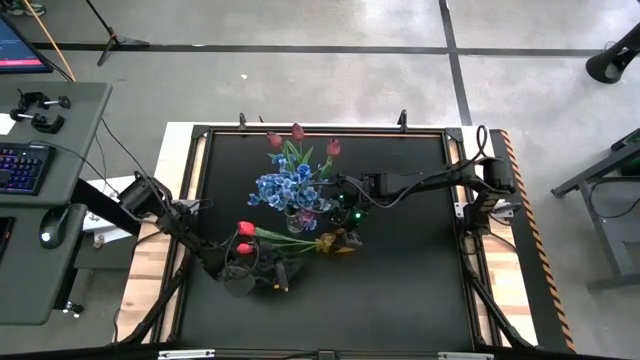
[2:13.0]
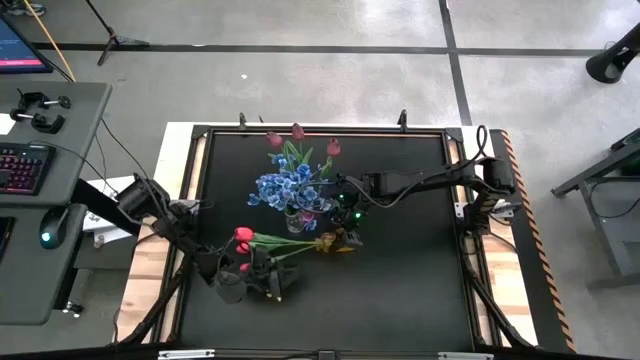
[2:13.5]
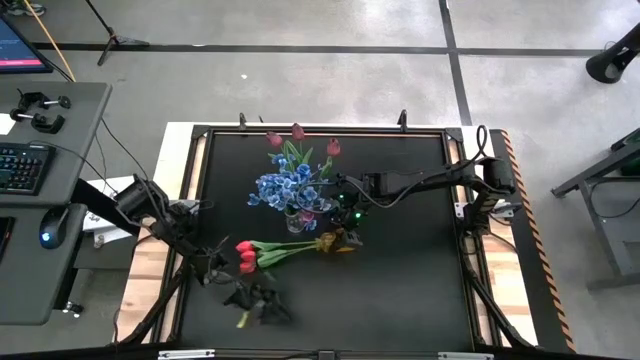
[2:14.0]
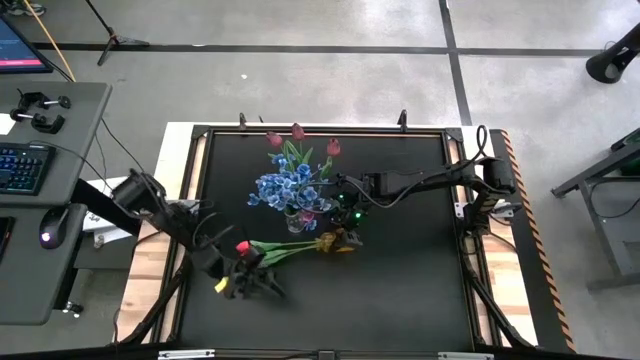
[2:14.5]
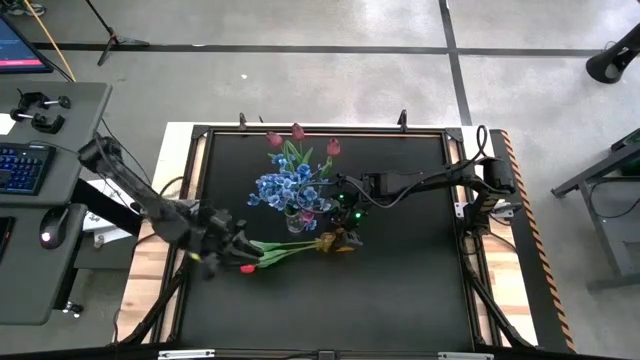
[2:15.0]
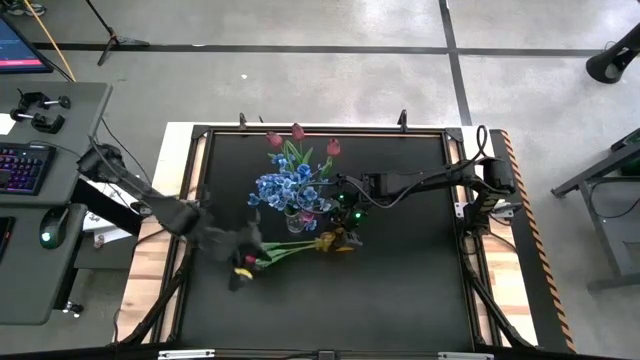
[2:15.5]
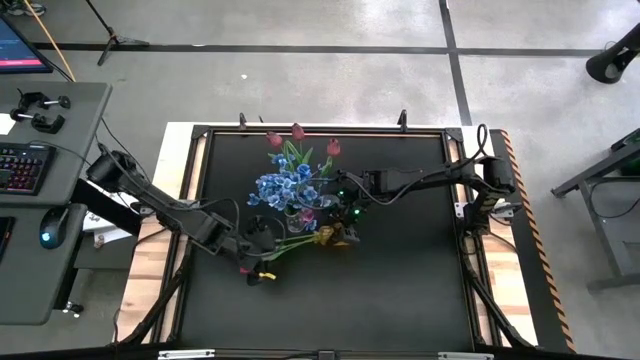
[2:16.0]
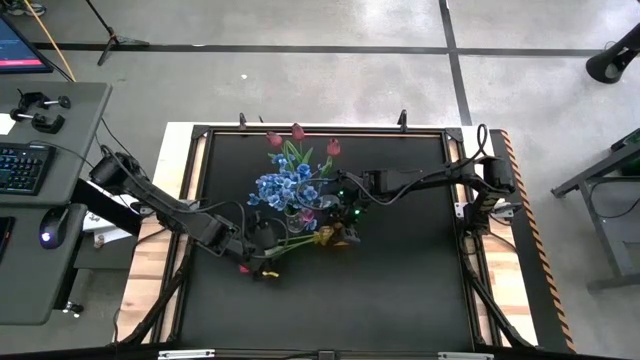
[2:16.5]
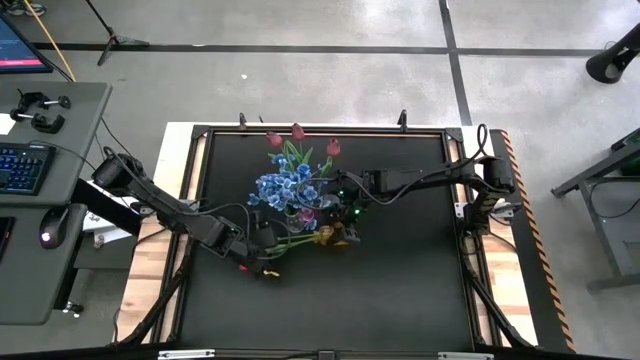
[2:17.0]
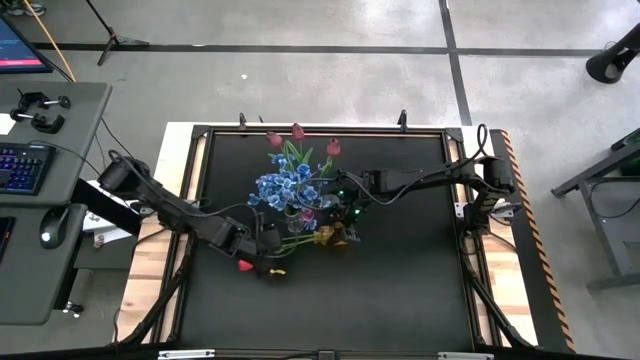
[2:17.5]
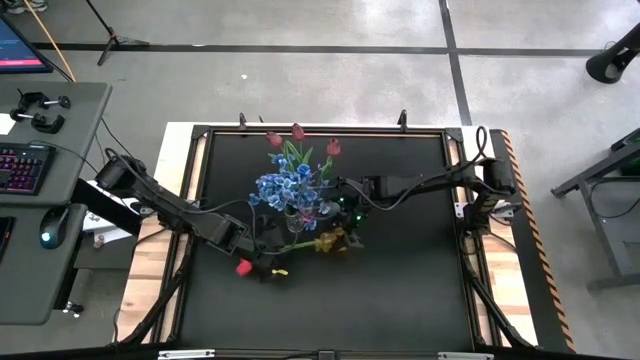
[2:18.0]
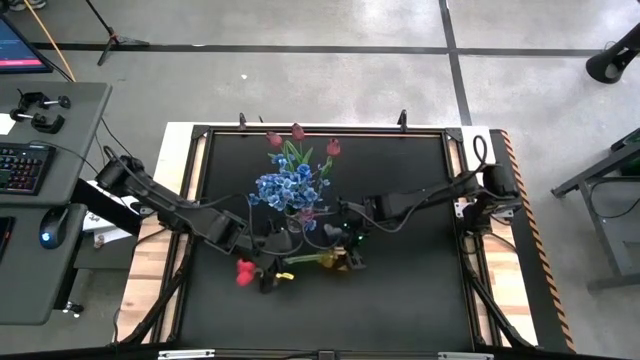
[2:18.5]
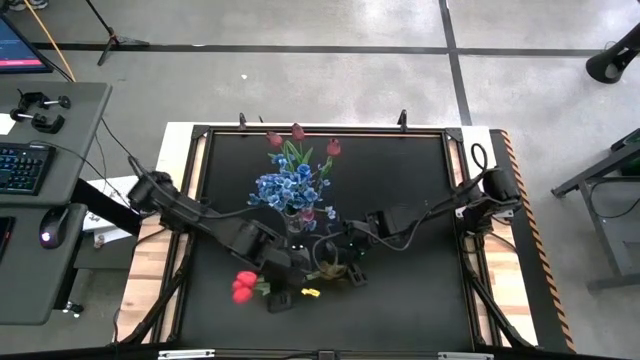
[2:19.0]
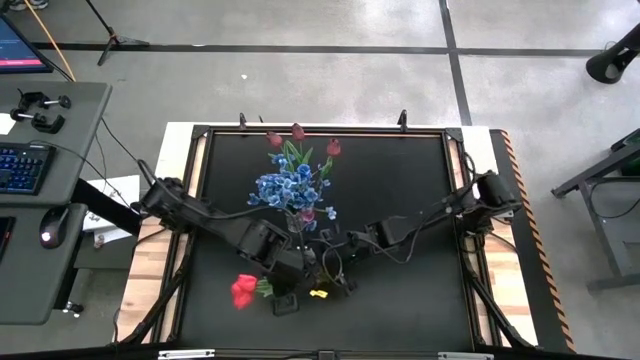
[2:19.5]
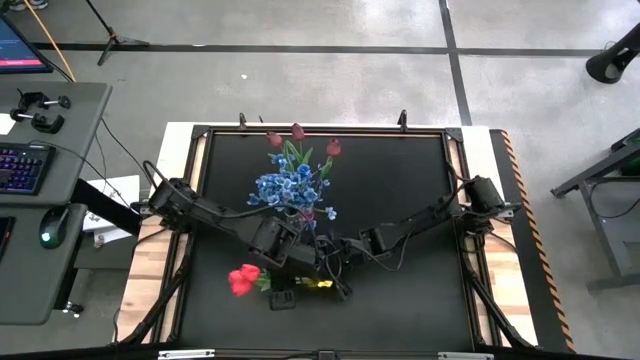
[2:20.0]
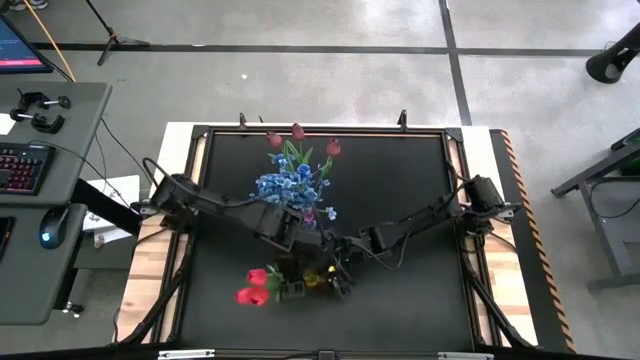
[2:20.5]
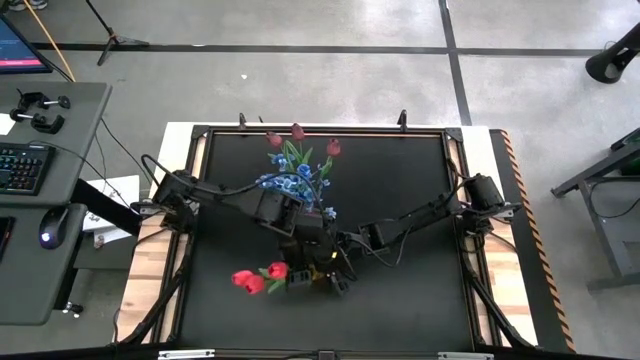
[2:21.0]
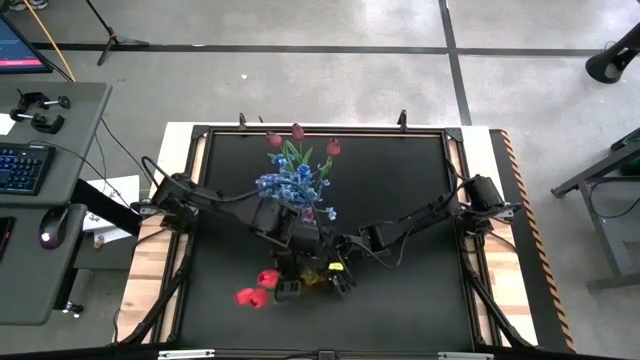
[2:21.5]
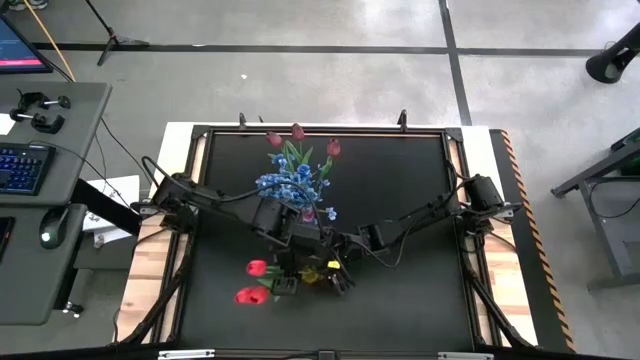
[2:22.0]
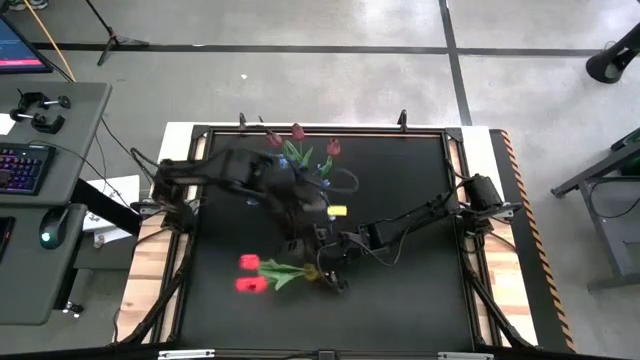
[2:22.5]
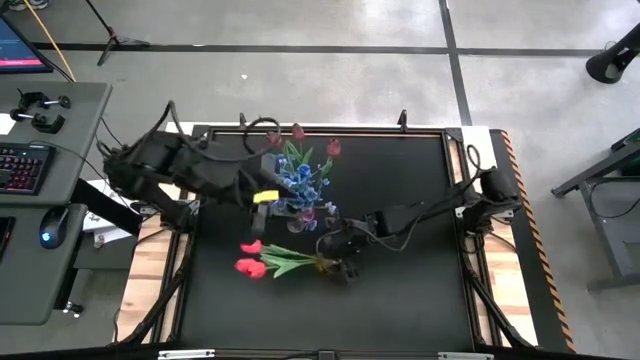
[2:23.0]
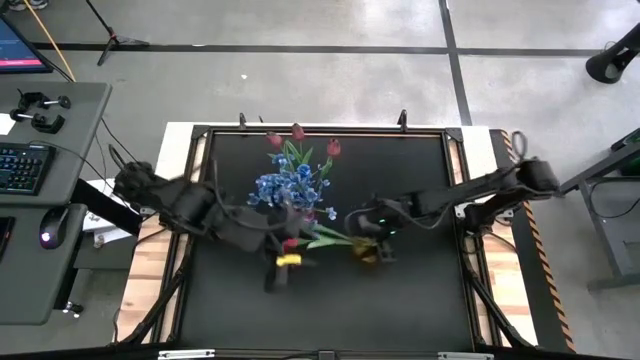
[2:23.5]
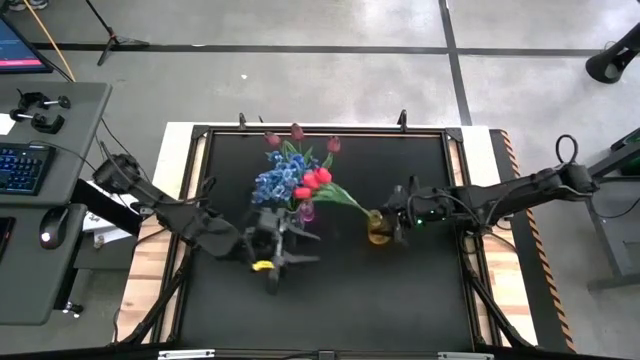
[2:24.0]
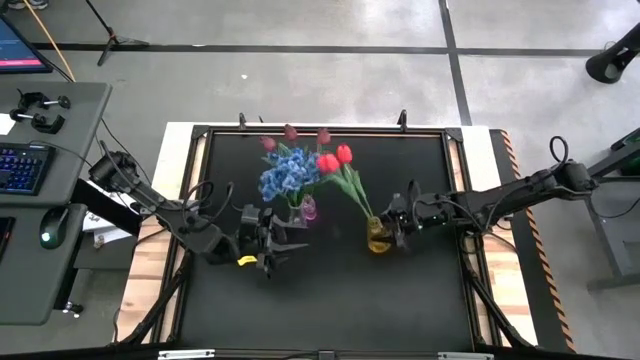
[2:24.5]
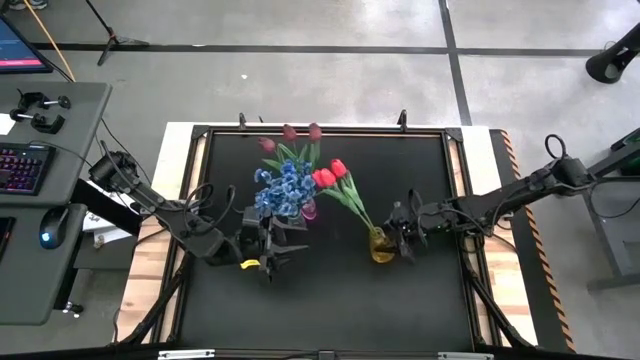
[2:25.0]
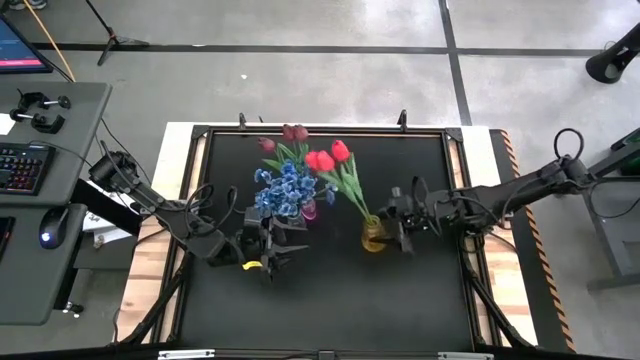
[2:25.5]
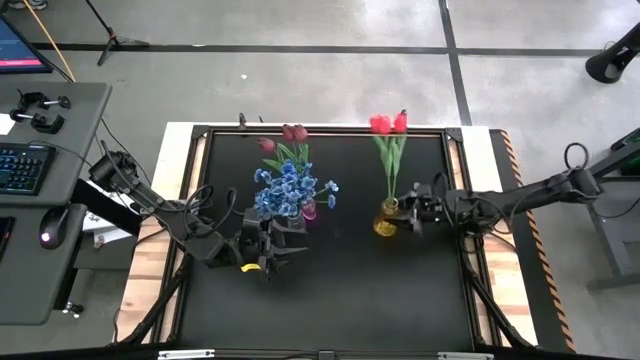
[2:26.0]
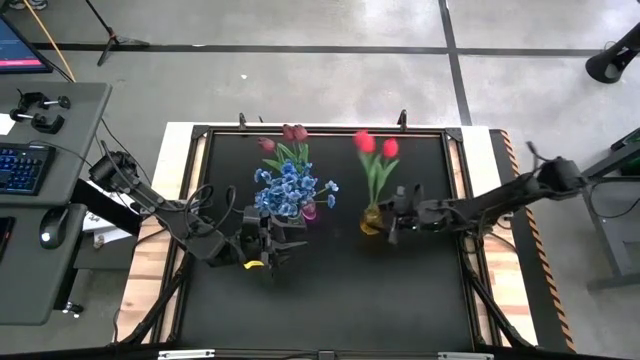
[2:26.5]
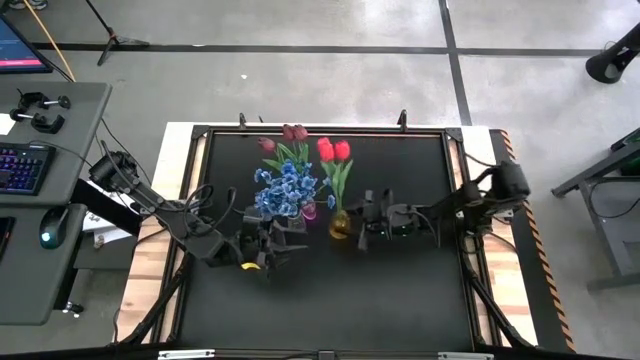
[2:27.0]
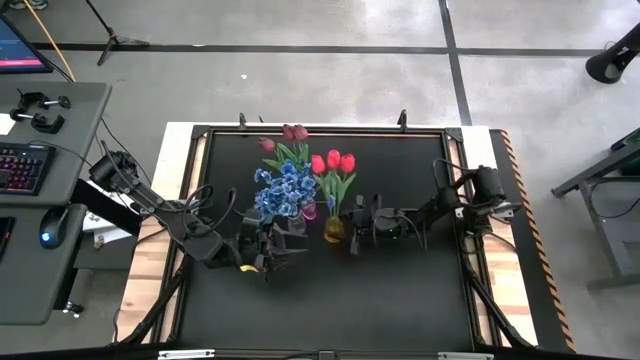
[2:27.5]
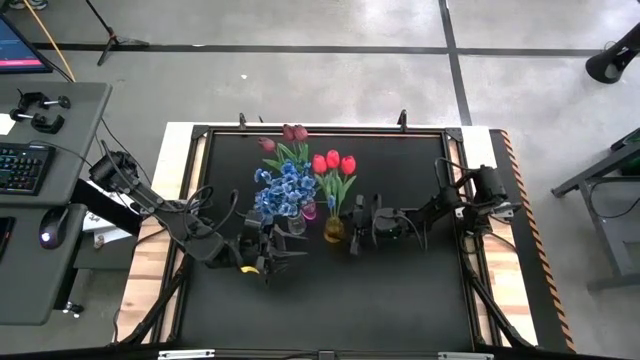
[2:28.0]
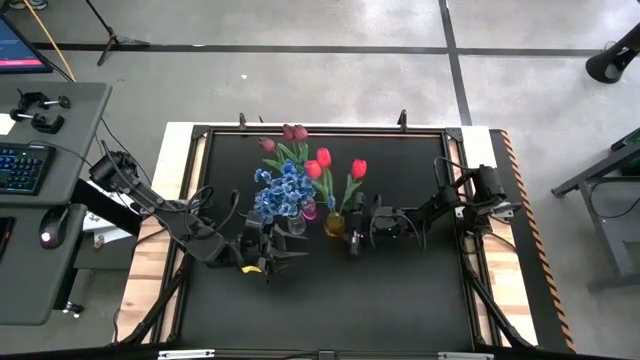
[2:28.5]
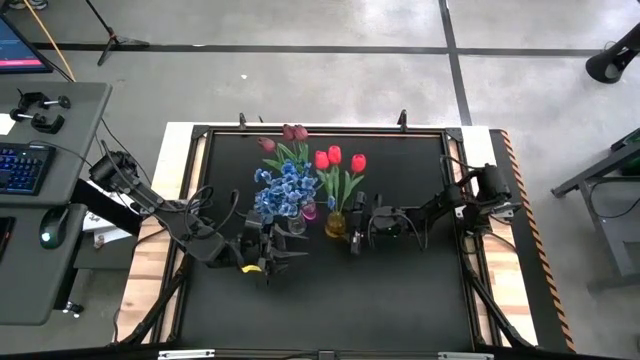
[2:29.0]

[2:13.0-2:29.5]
Task: Sort flowers into vase by color
Put the red flower into the yellow vase

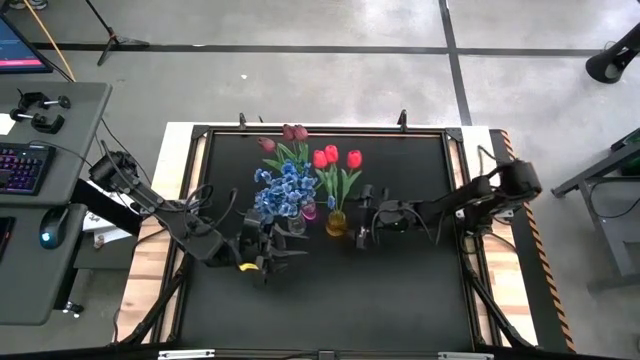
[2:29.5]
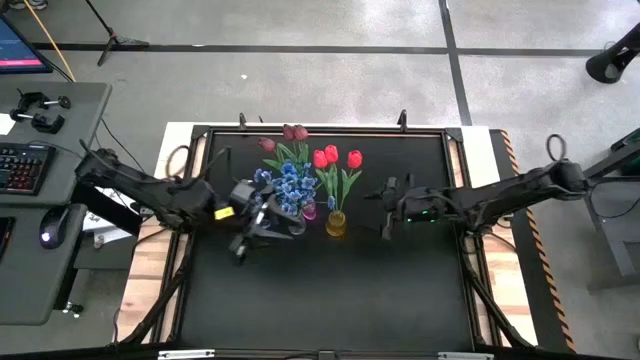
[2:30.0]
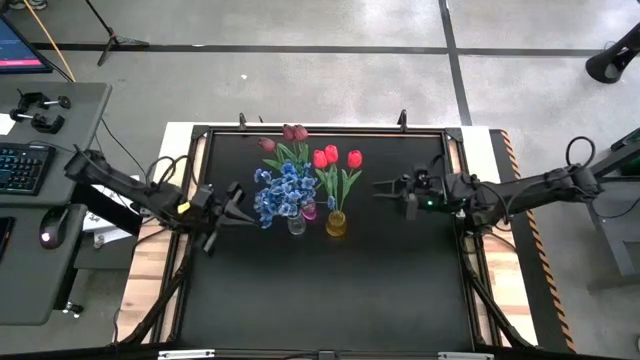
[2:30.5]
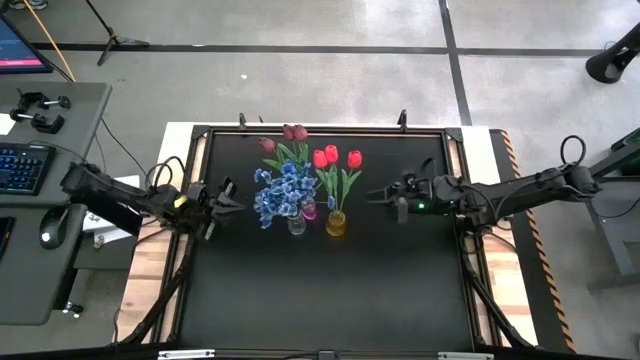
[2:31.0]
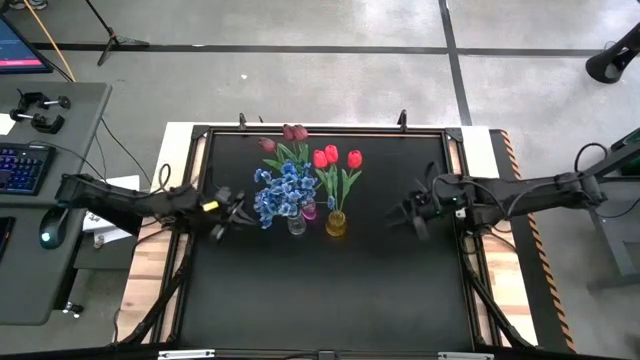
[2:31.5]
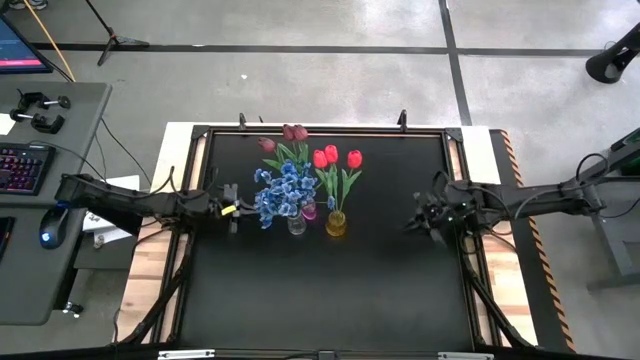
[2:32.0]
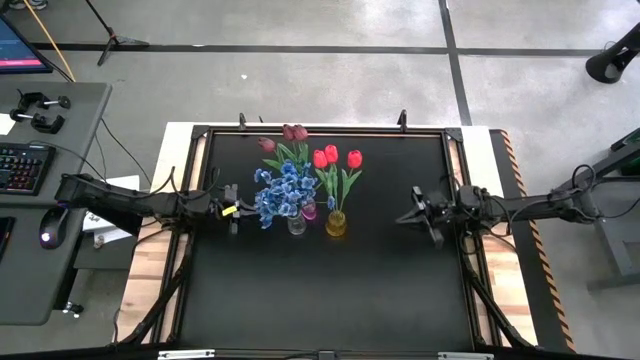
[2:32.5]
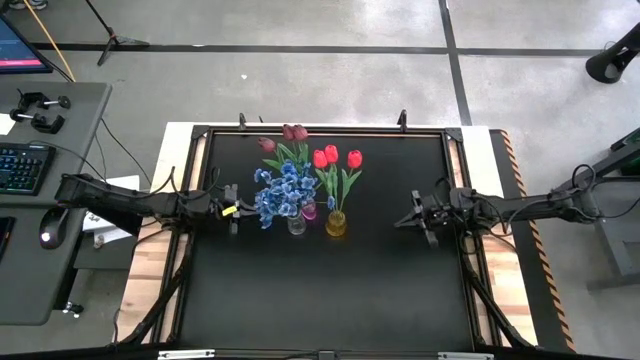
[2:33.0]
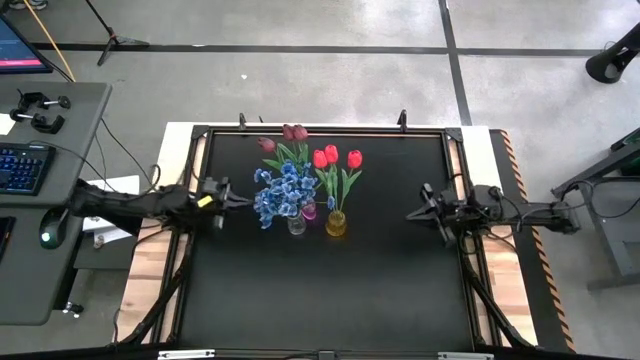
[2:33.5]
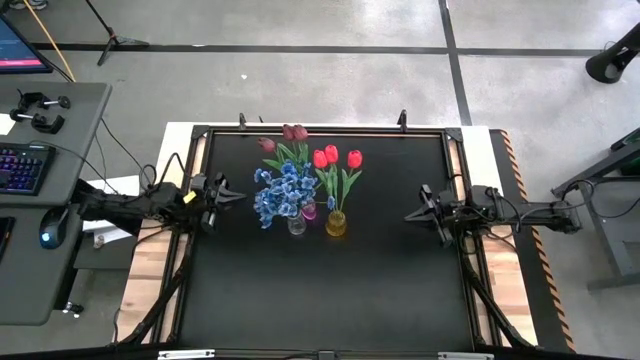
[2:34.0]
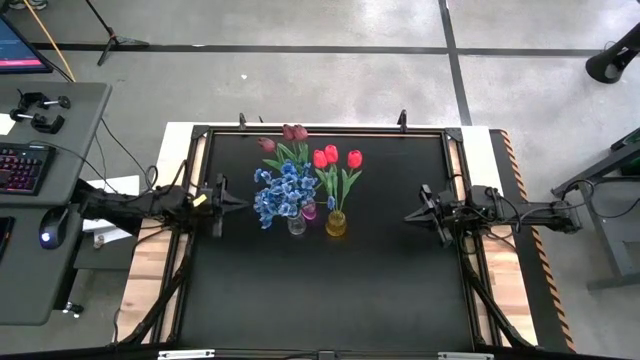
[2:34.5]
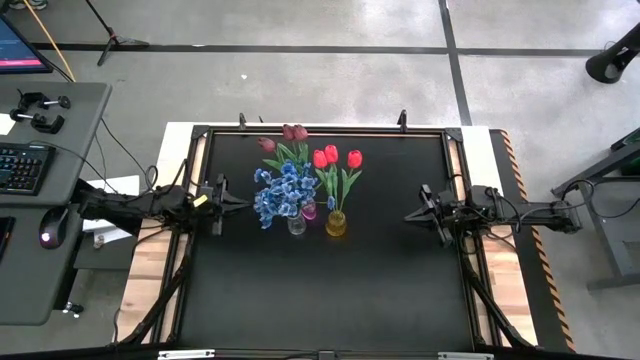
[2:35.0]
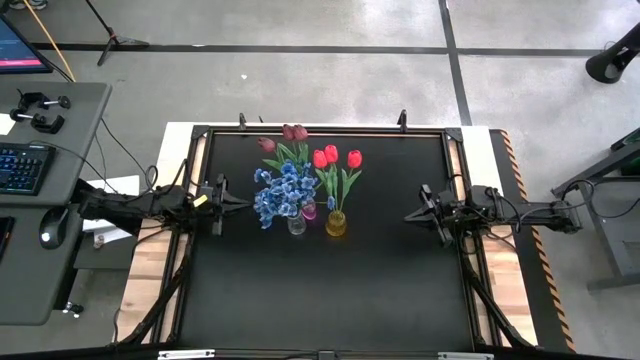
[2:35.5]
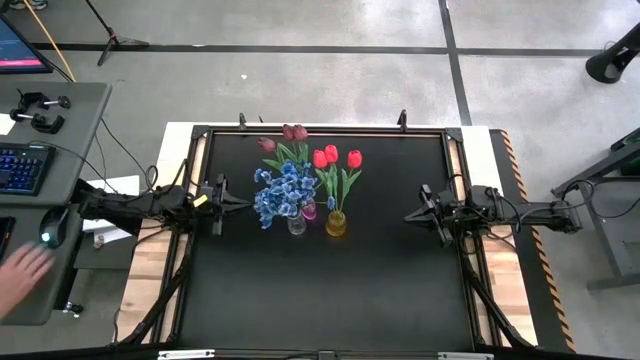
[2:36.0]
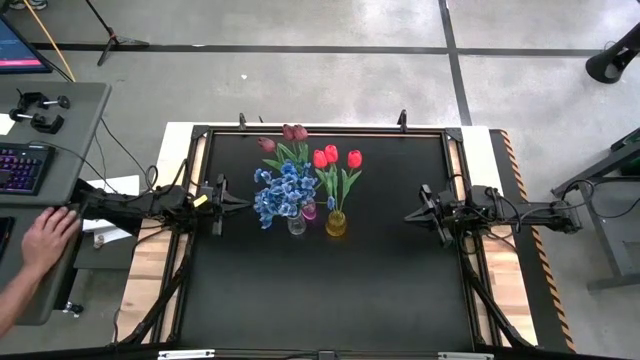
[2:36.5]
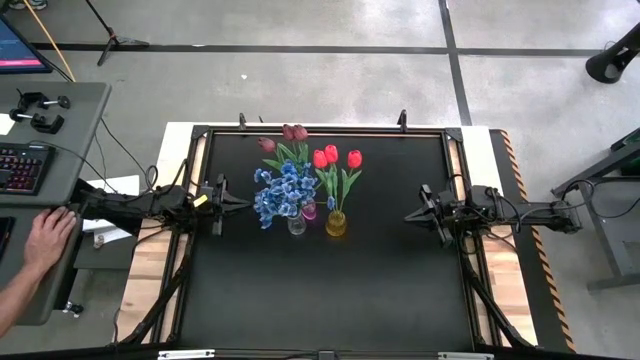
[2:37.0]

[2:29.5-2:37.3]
Return To Home Position
